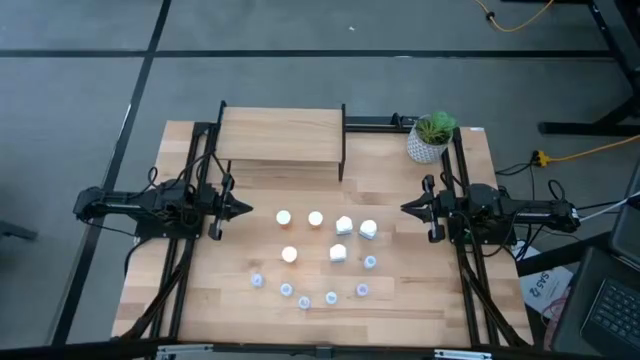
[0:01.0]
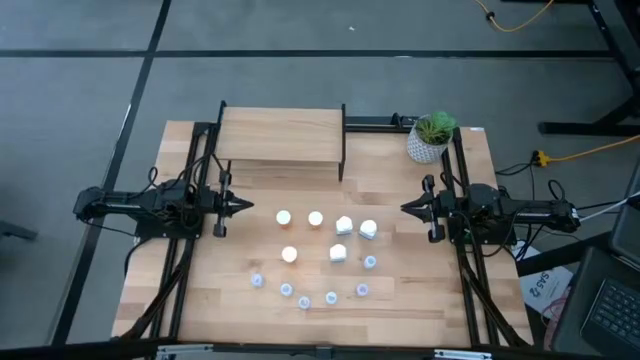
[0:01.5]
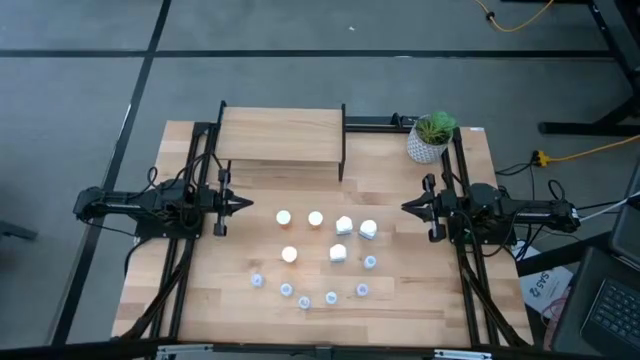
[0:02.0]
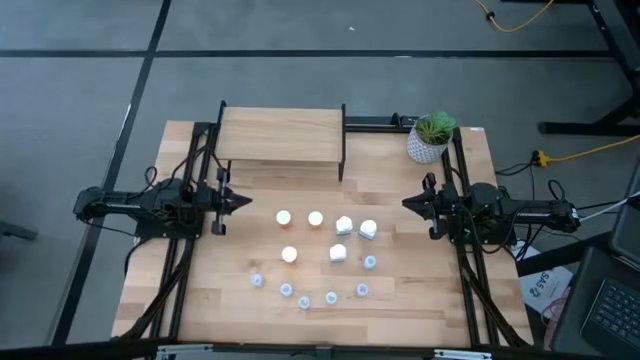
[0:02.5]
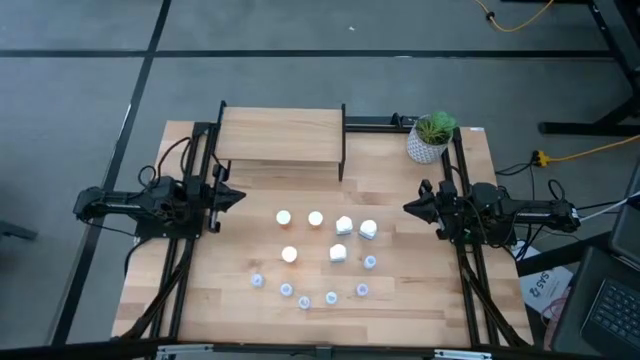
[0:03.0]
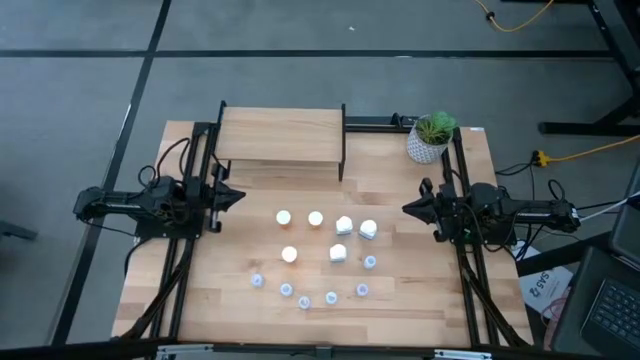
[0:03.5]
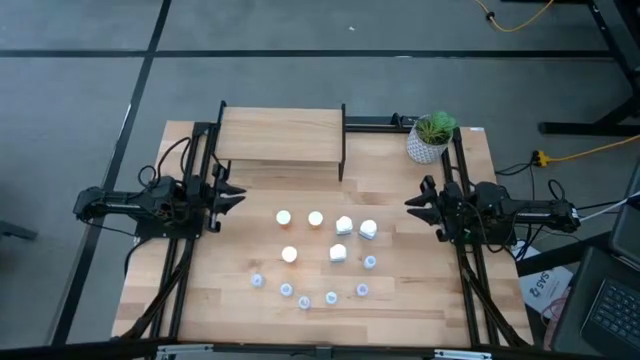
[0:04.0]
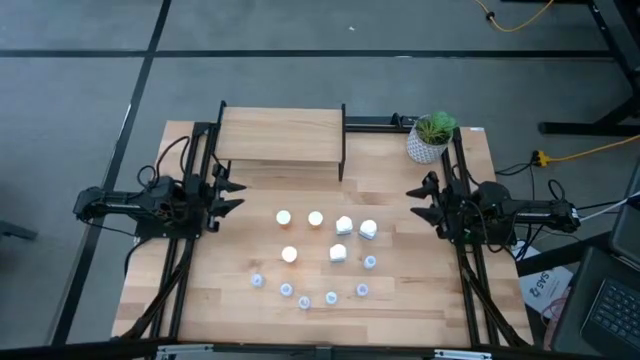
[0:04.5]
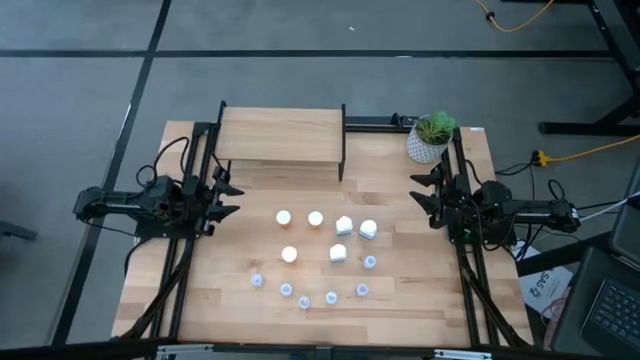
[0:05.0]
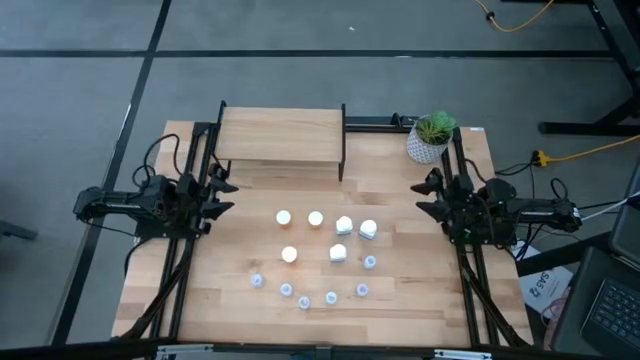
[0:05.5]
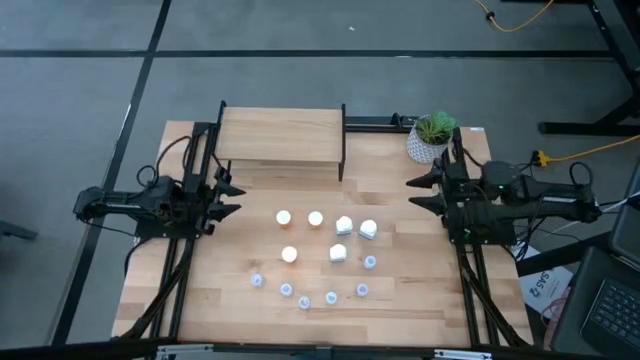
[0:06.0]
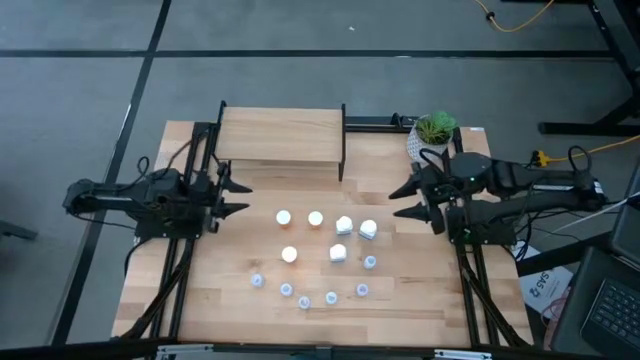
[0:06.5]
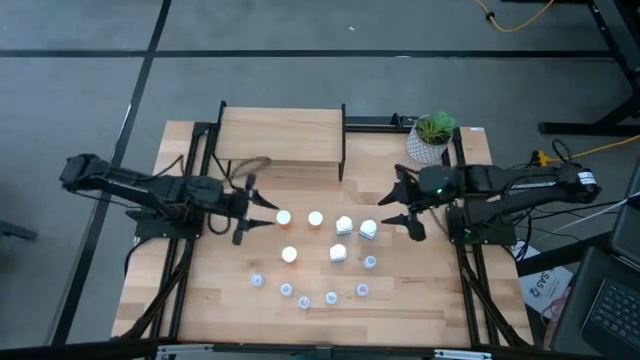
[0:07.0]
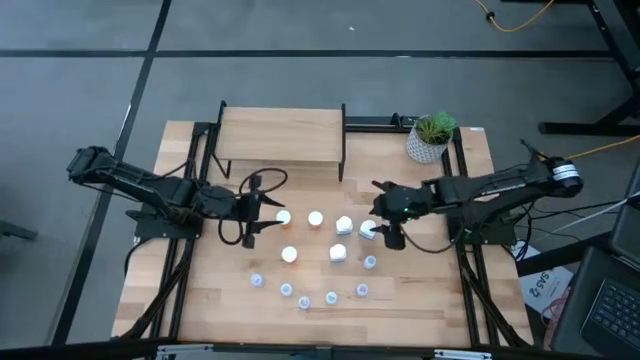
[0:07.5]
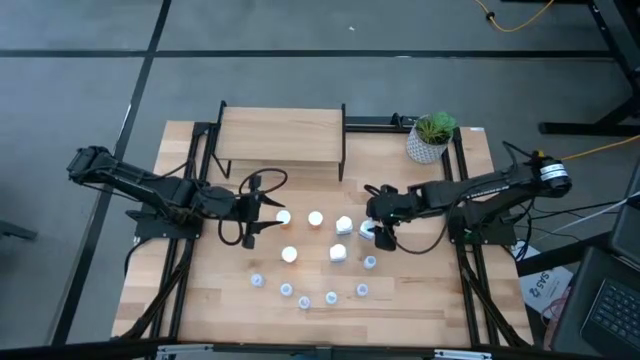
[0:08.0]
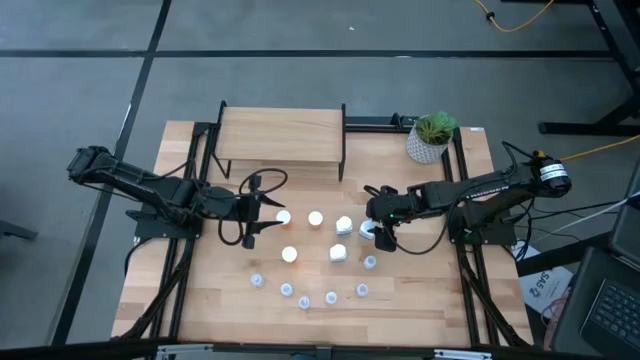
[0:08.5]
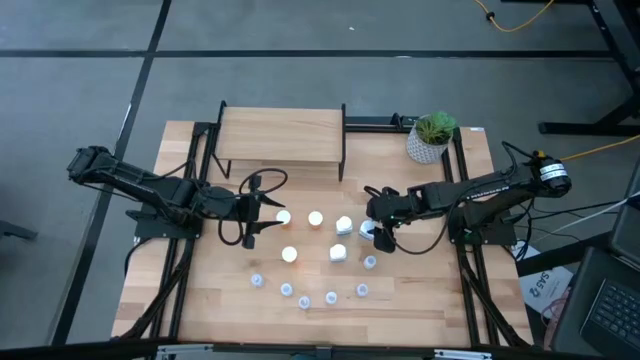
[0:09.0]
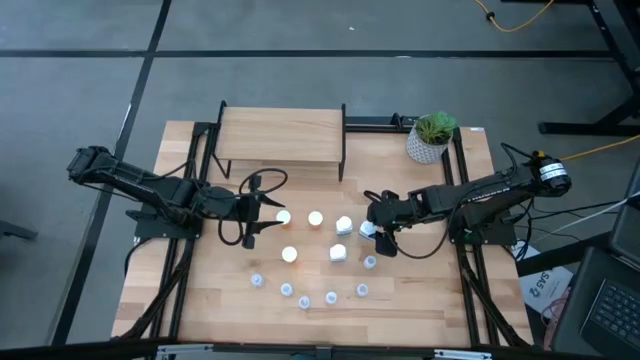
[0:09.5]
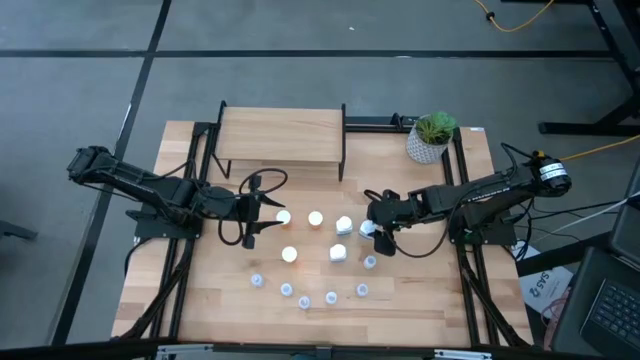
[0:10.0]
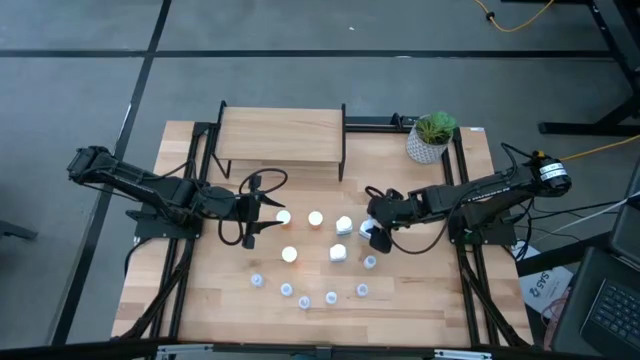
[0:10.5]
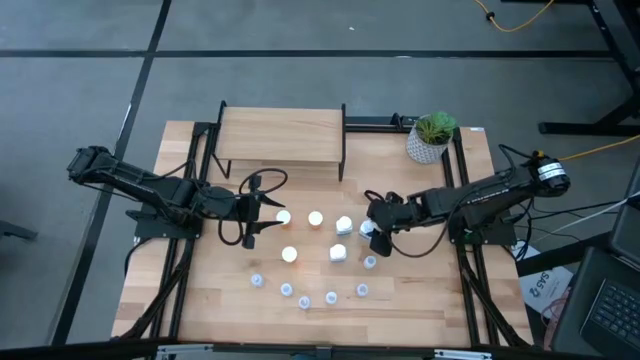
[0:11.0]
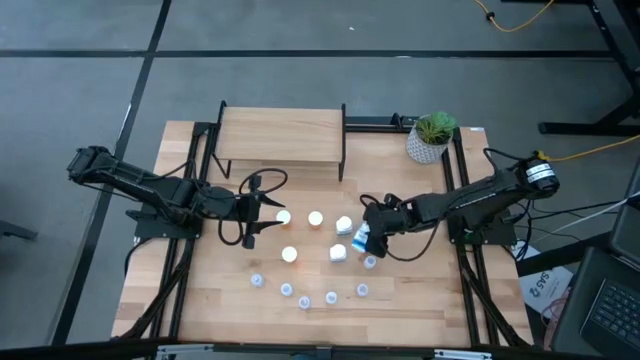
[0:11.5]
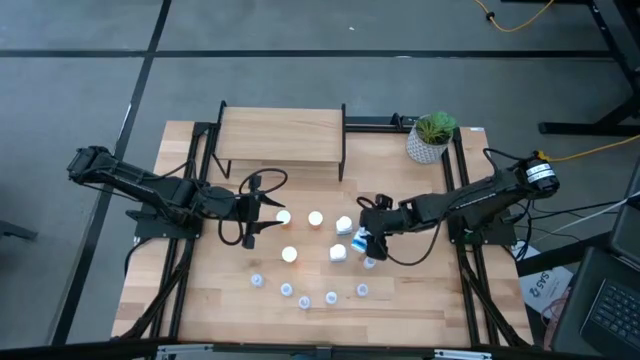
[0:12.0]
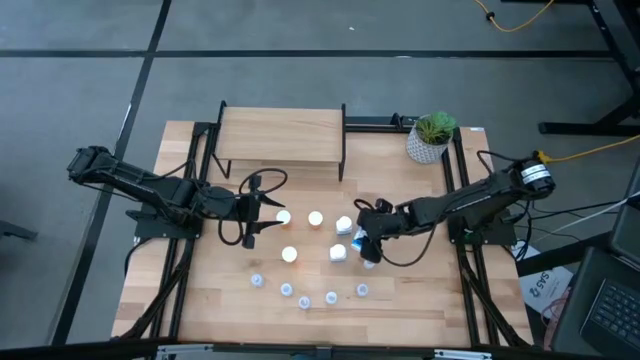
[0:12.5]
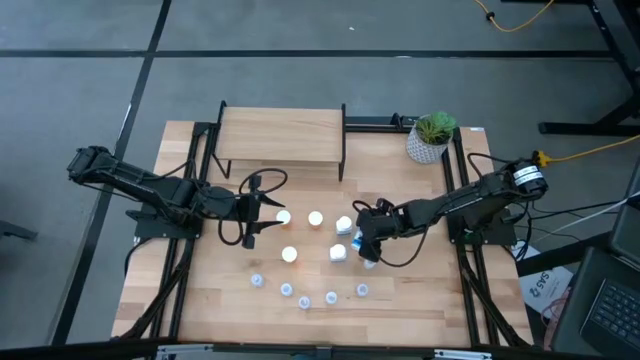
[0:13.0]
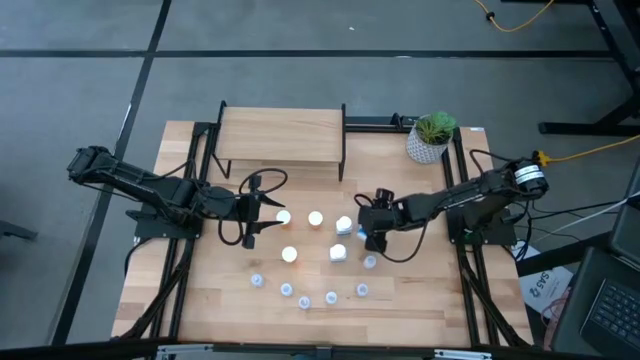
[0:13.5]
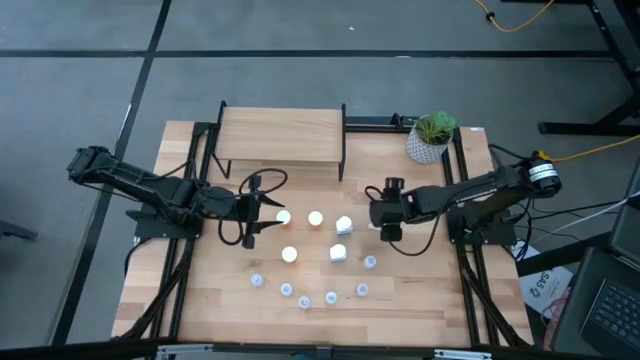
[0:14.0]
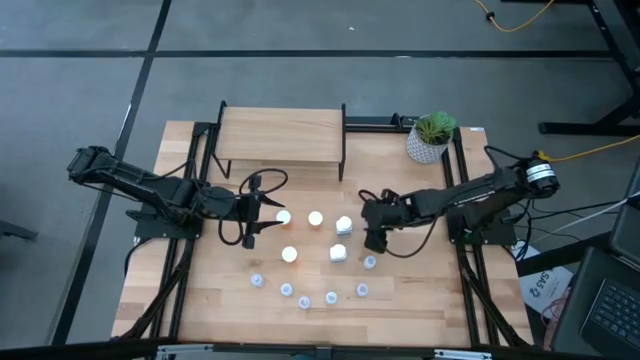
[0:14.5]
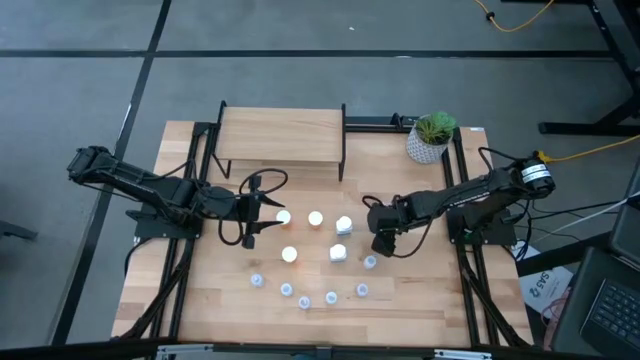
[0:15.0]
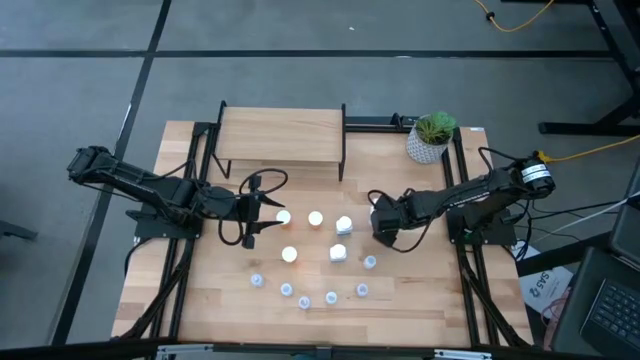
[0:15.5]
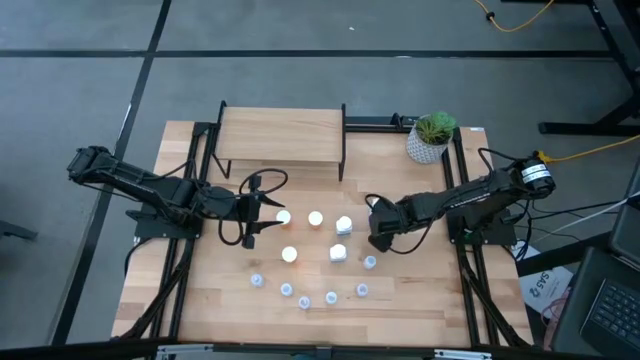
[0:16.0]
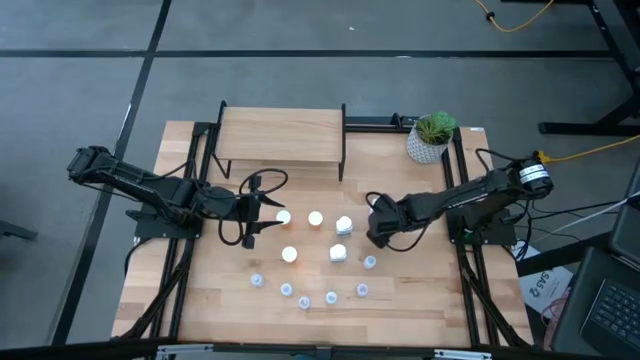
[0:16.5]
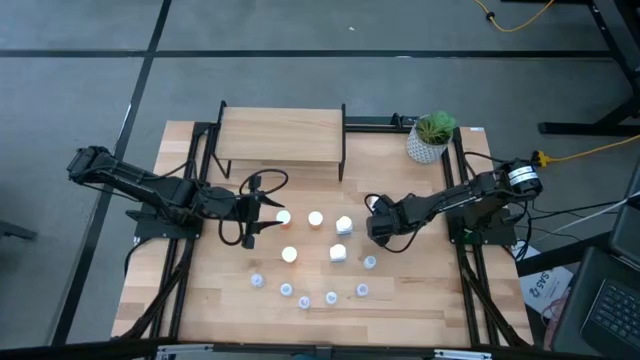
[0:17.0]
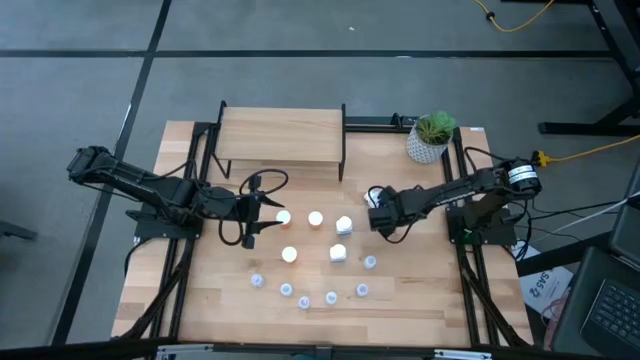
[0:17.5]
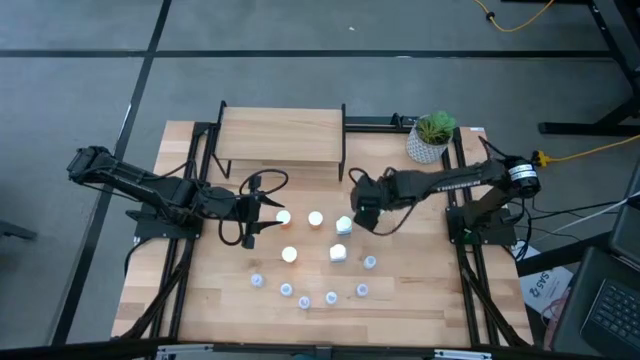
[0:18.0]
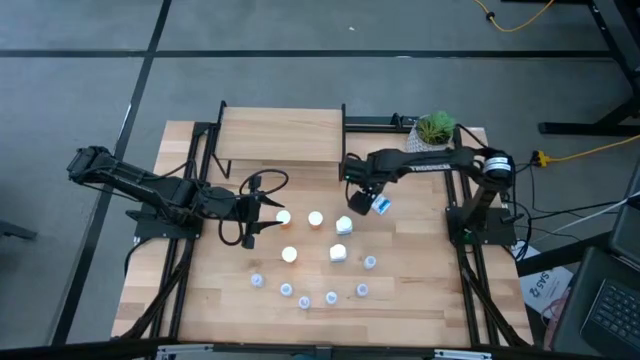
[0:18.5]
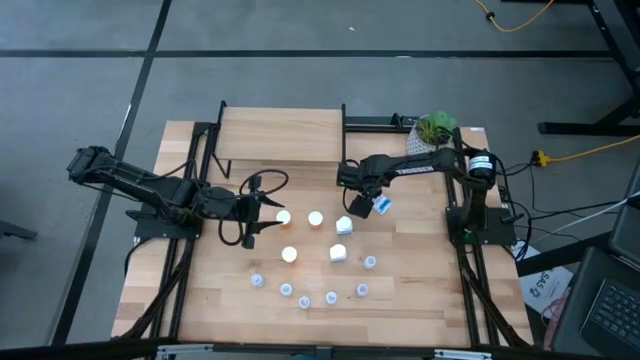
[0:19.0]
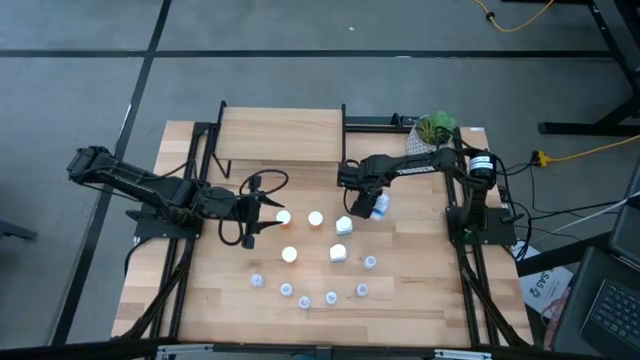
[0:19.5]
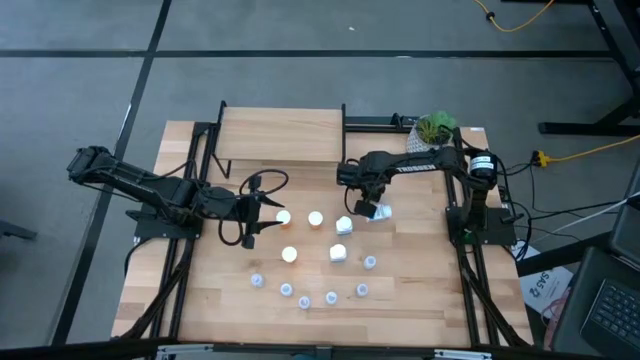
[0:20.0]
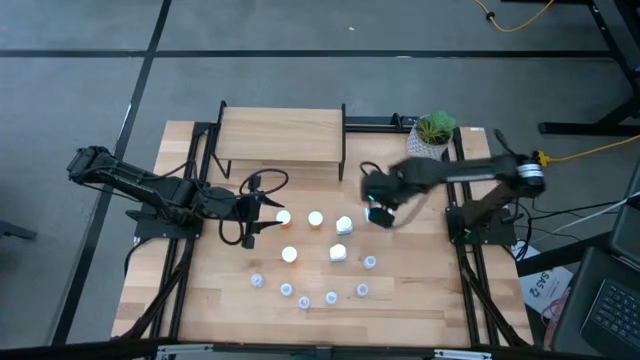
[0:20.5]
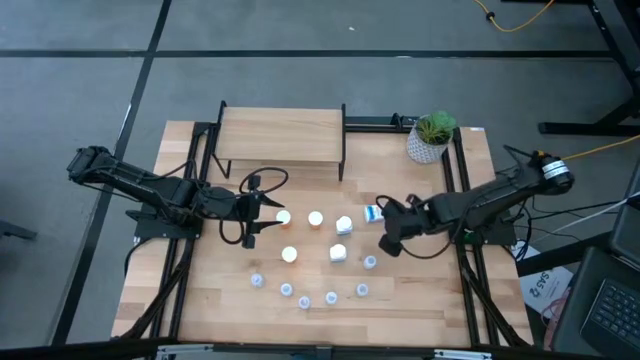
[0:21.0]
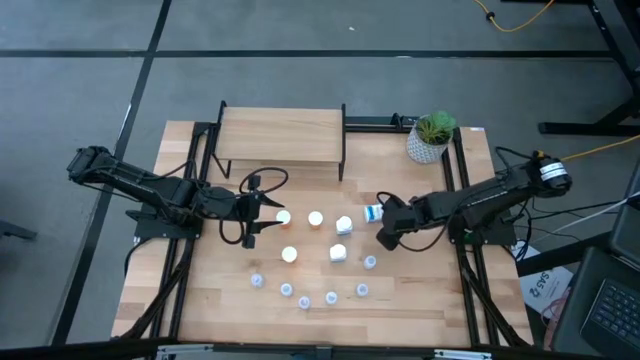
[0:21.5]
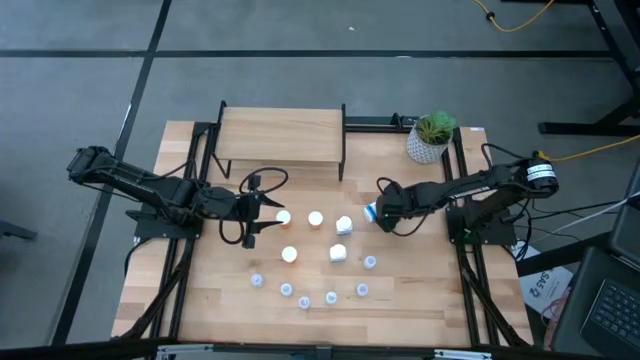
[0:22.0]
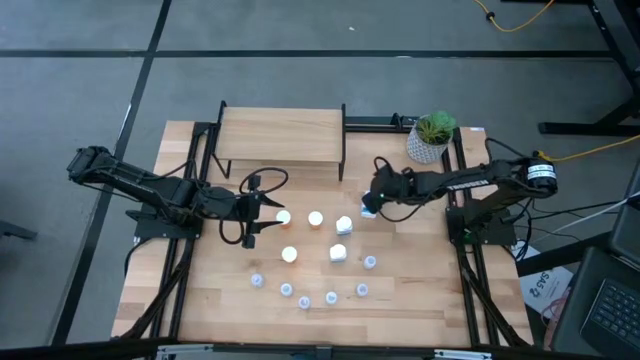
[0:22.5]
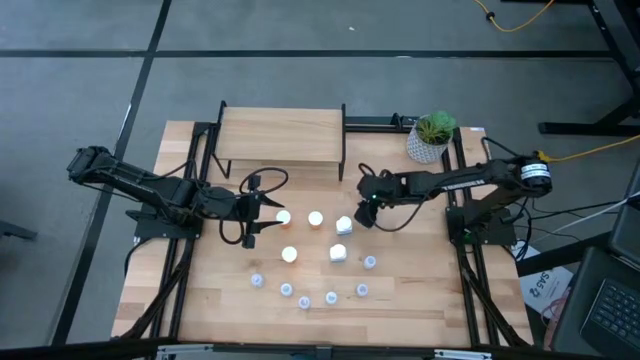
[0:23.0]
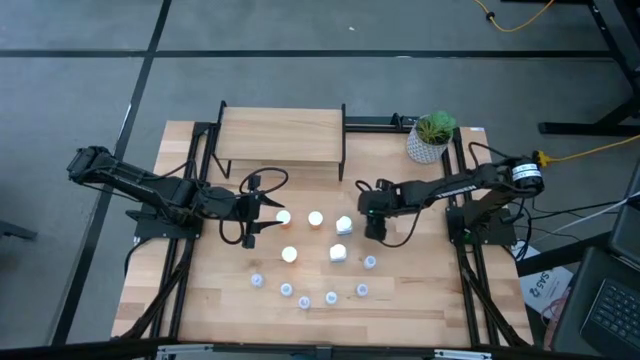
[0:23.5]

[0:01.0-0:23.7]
Task: Pick and place medicine bottles onto shelf by color
Put the top right blue pill bottle on the shelf
